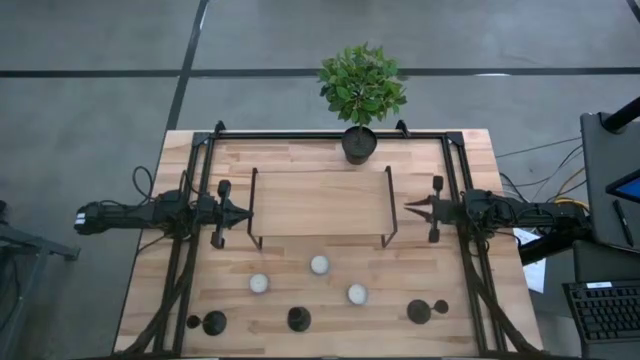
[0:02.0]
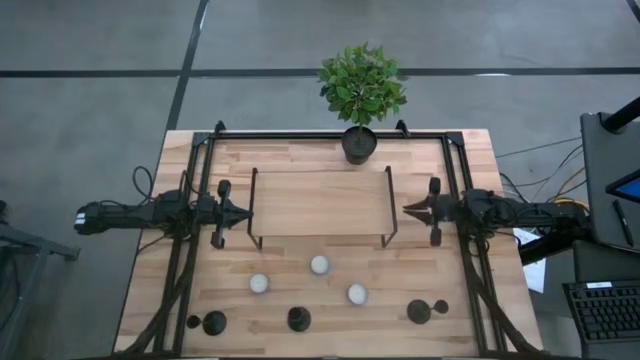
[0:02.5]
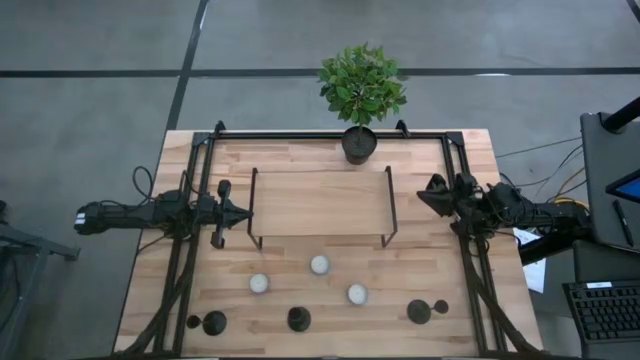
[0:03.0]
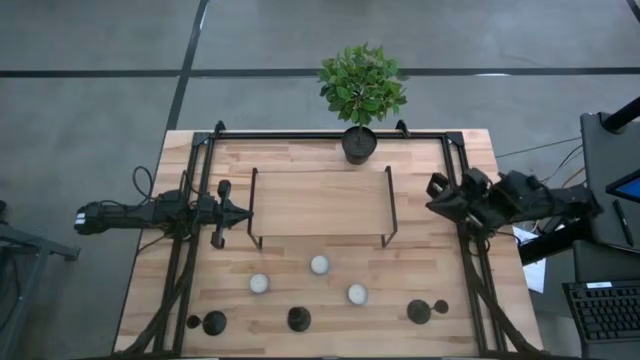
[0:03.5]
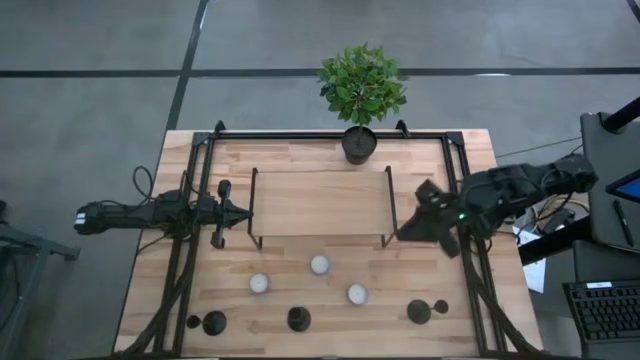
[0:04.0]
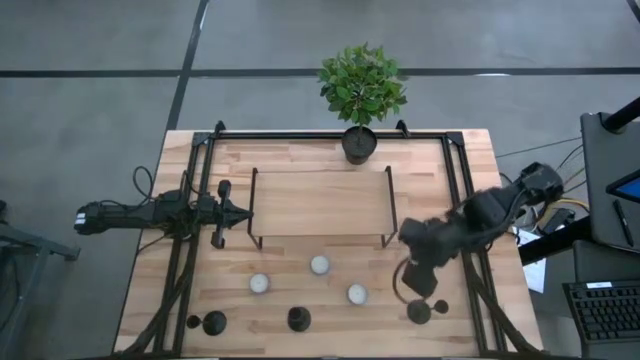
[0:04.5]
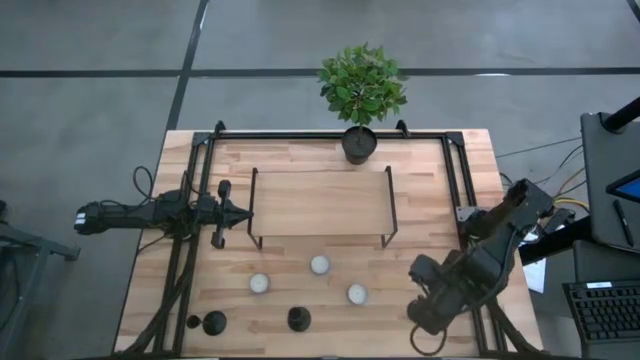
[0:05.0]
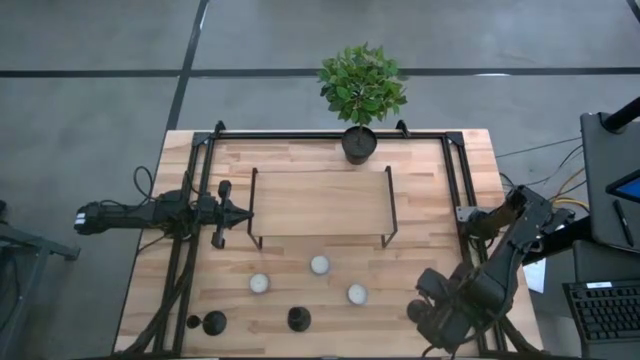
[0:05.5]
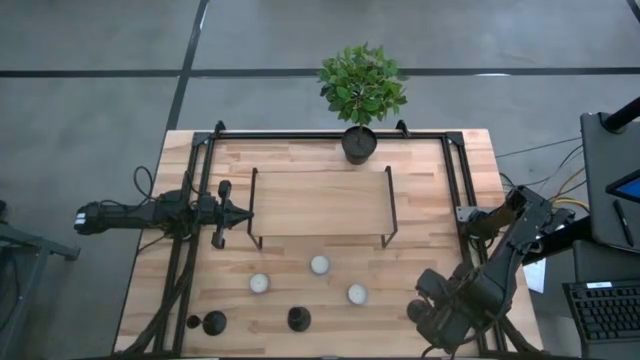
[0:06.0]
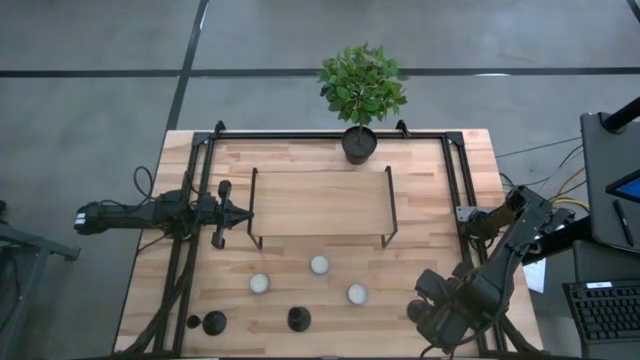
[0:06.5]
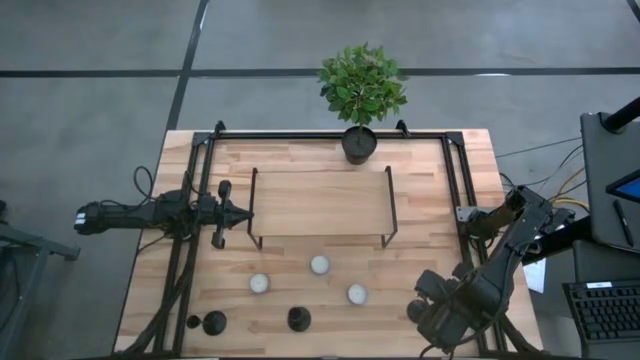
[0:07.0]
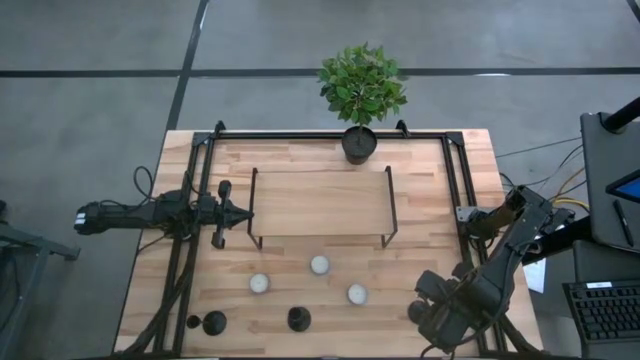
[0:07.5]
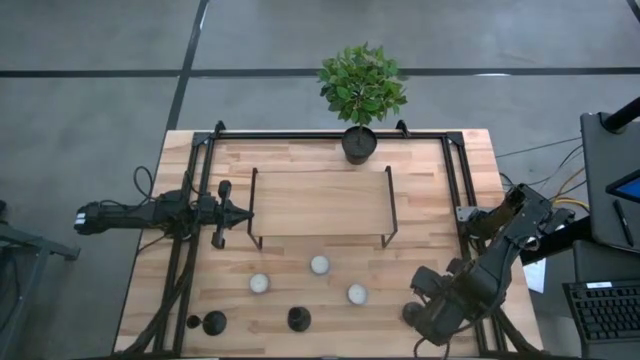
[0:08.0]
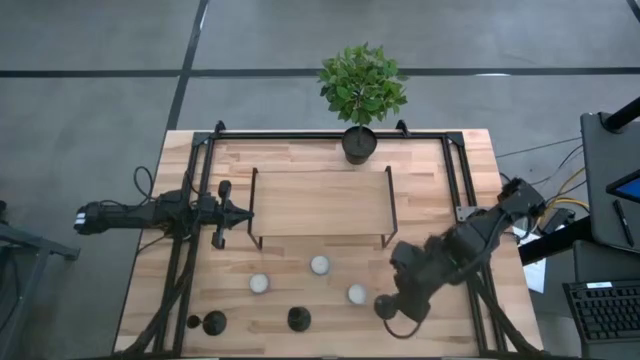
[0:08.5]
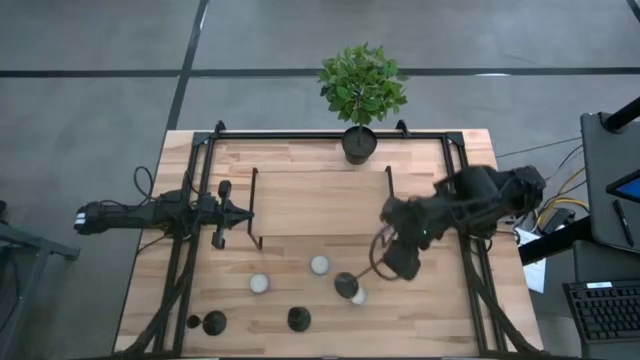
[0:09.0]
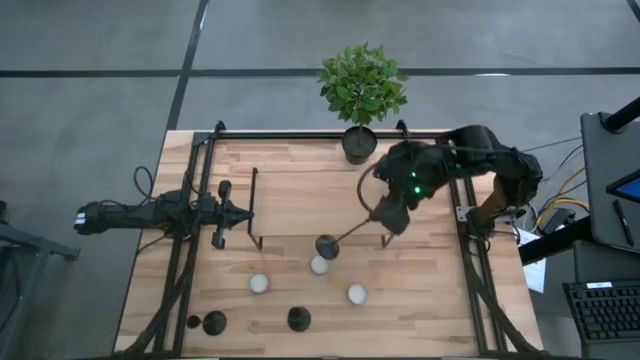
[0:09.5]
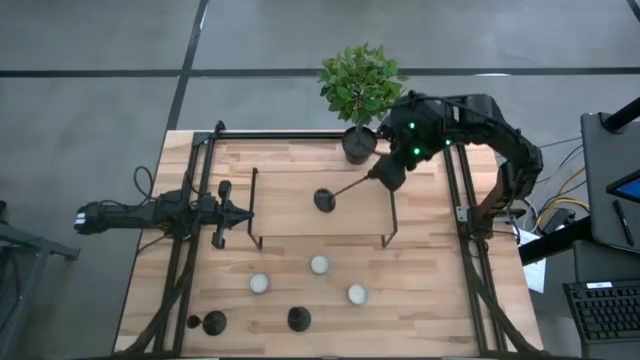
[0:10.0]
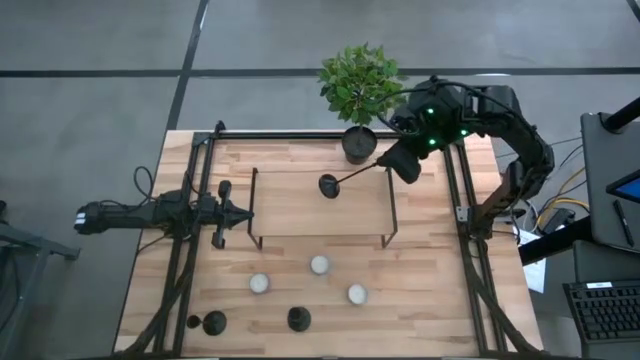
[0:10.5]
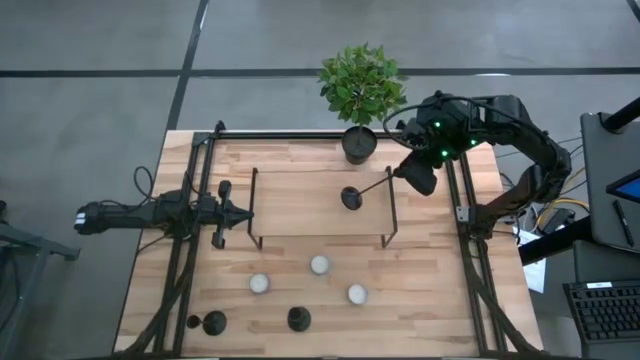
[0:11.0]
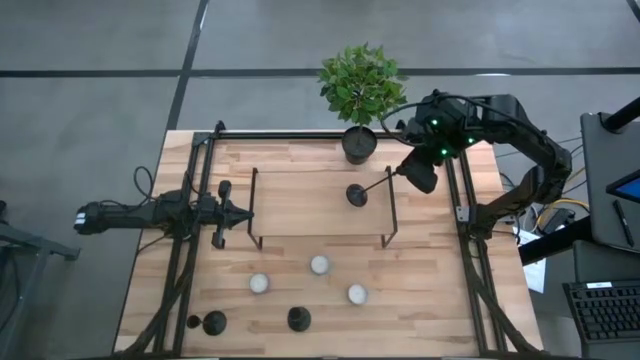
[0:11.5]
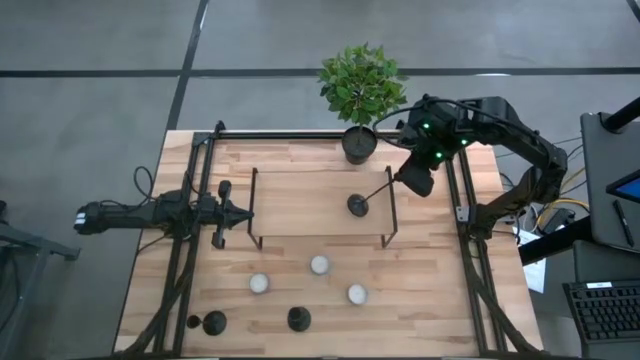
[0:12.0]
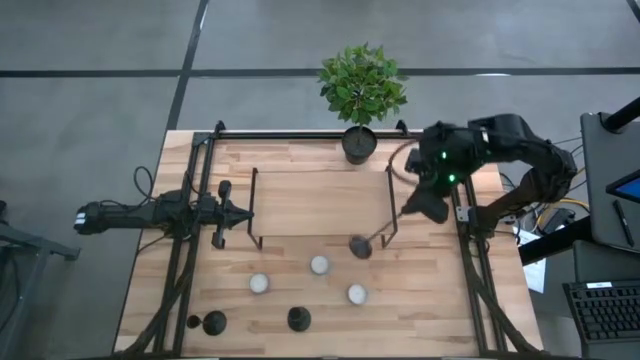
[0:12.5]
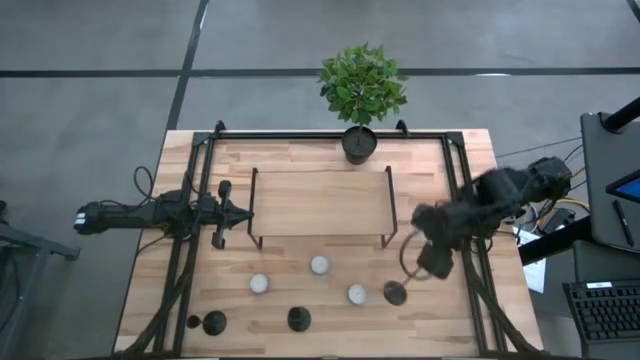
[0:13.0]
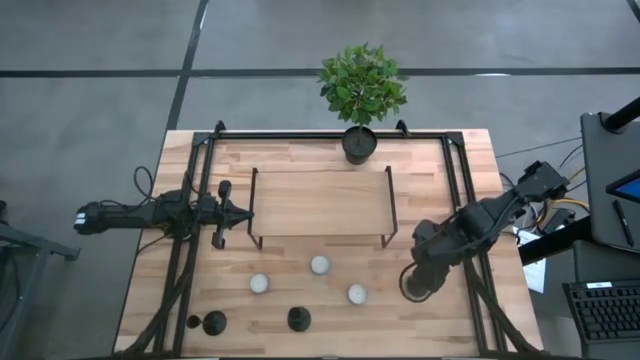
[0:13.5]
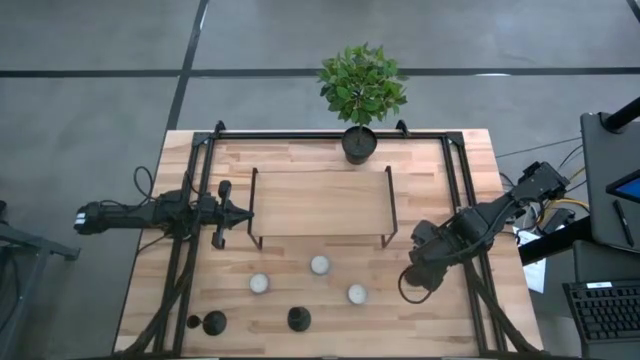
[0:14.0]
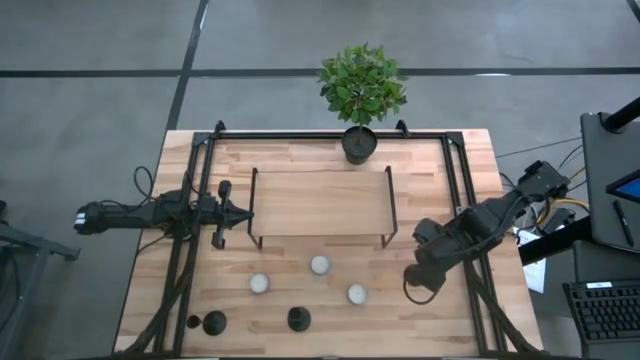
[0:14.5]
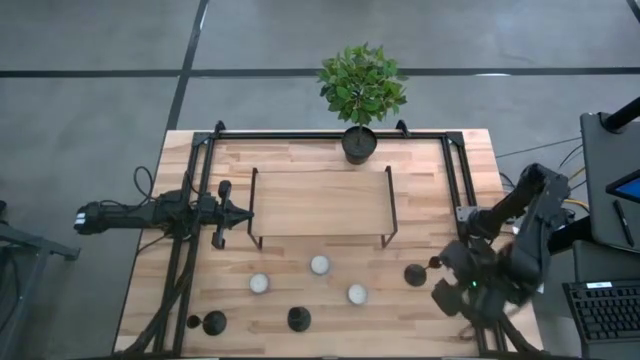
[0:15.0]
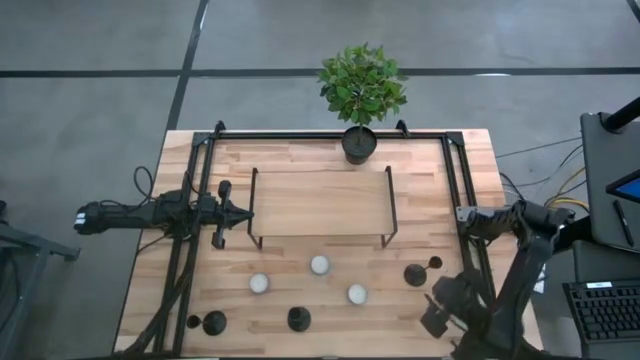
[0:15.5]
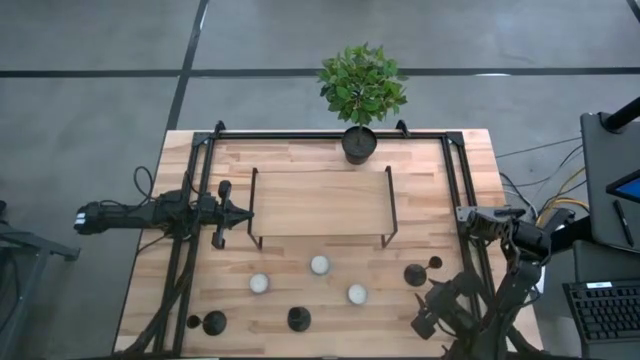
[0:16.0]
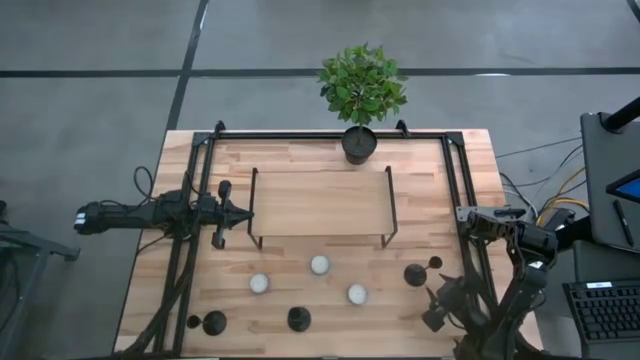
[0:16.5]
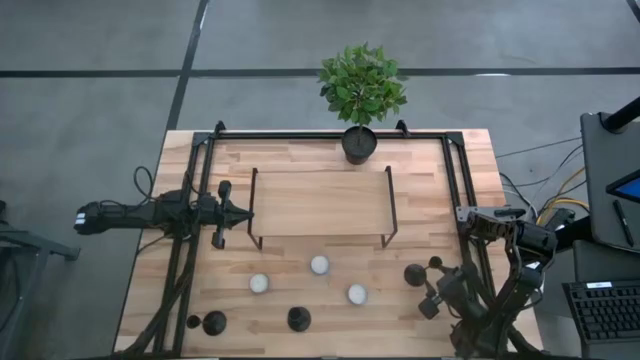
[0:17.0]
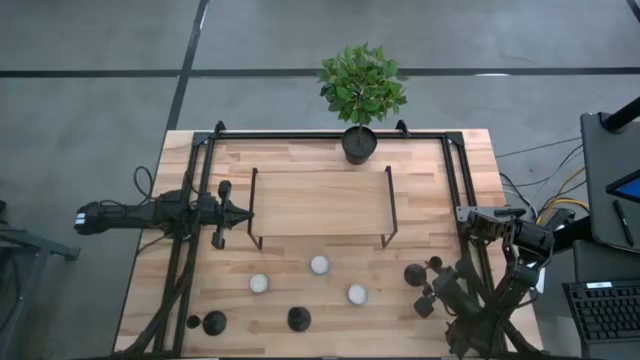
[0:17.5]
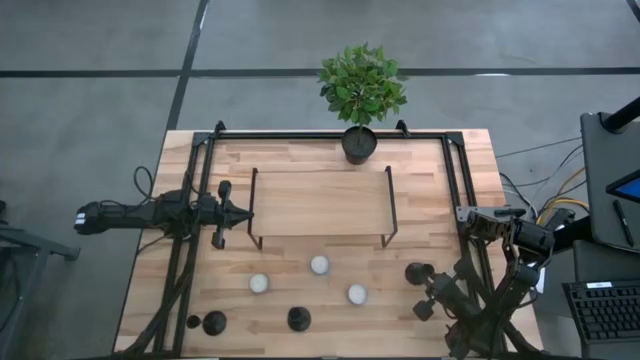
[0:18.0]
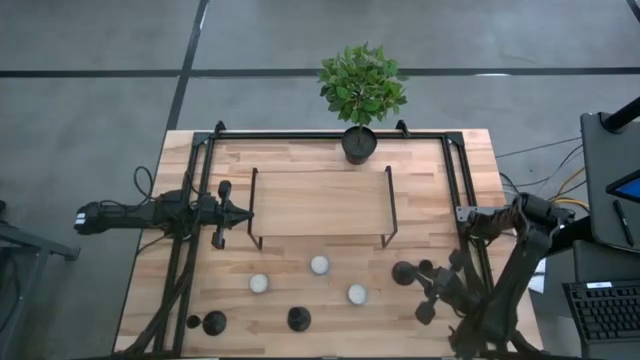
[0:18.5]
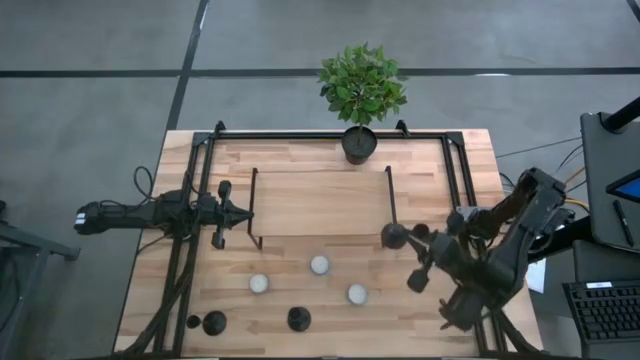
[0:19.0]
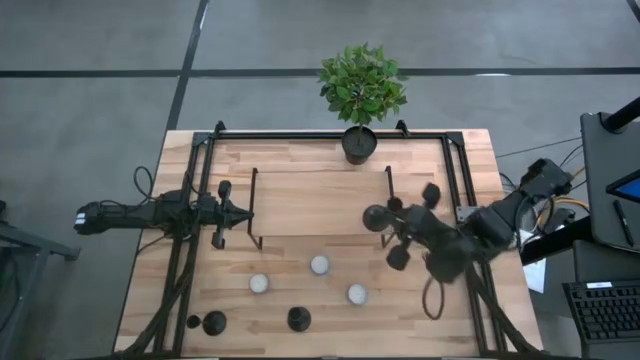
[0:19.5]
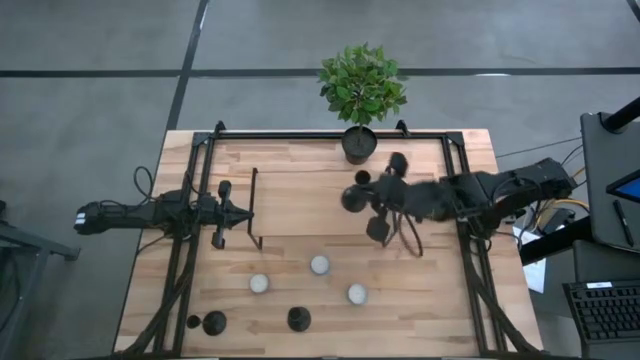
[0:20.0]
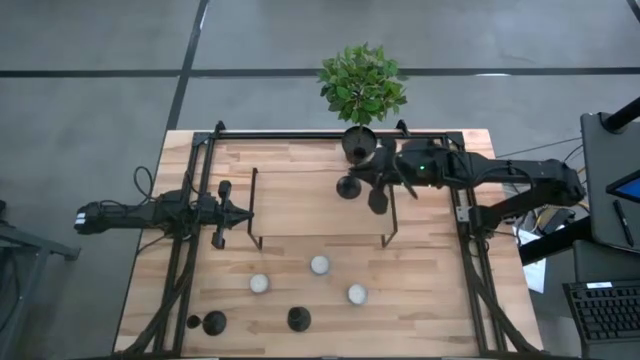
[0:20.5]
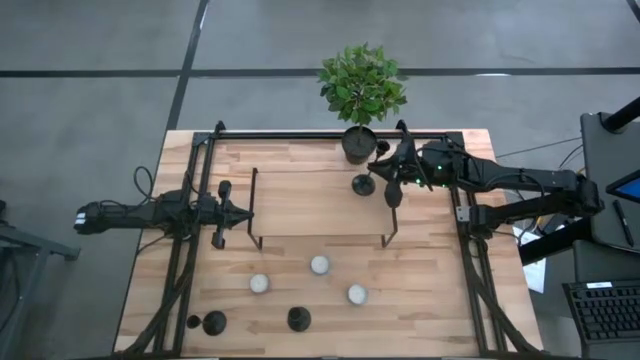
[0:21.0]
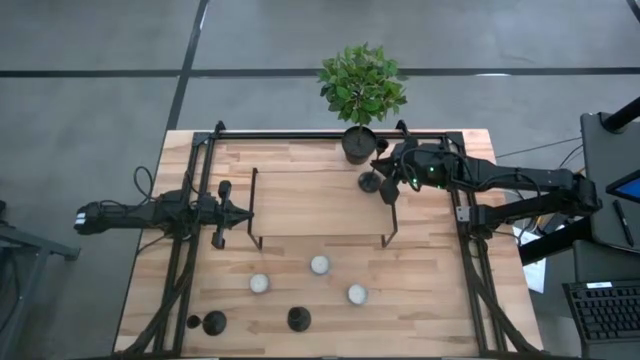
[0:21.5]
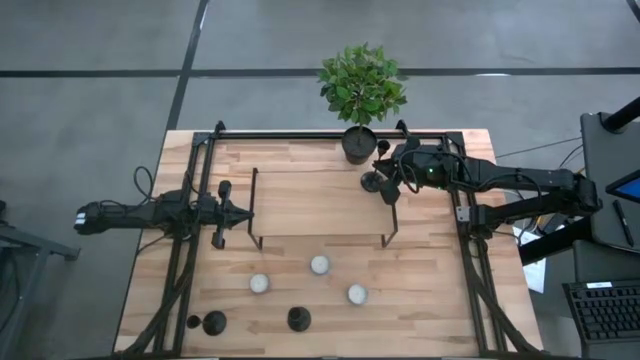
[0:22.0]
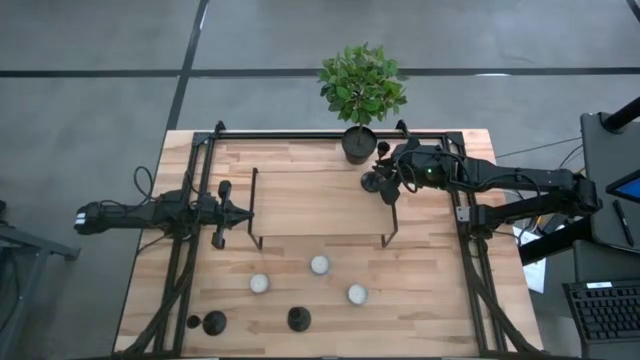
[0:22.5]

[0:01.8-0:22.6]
Task: Pick & Place candle stick holders
Put the right black candle holder on the shelf
